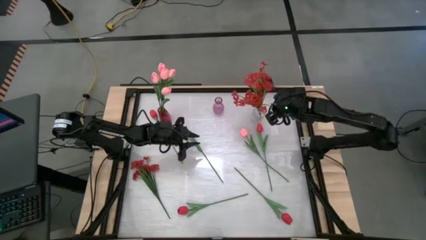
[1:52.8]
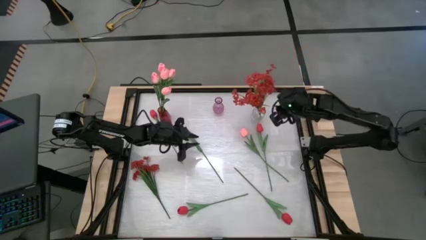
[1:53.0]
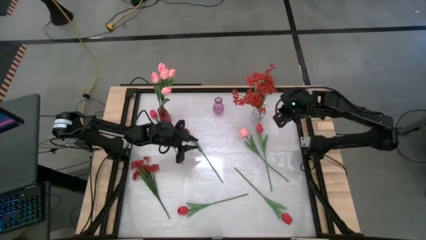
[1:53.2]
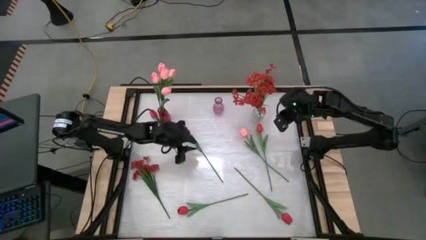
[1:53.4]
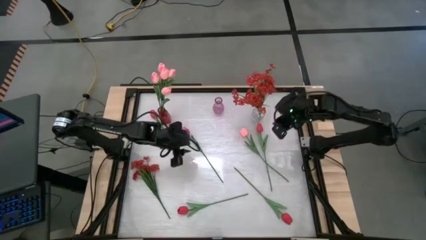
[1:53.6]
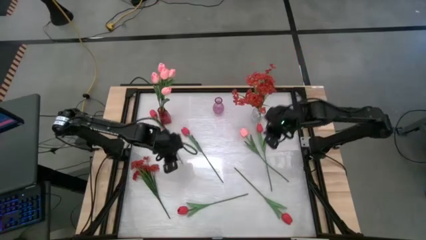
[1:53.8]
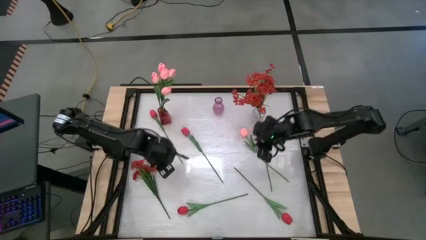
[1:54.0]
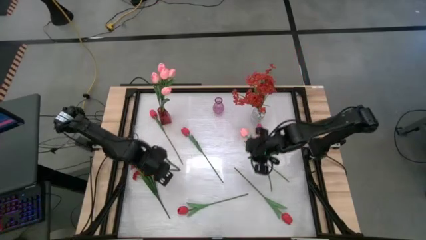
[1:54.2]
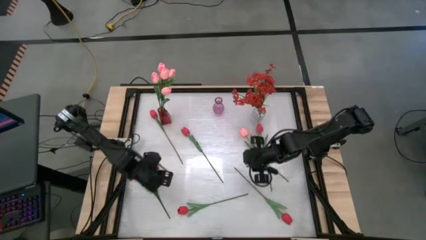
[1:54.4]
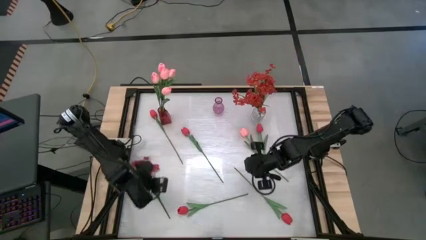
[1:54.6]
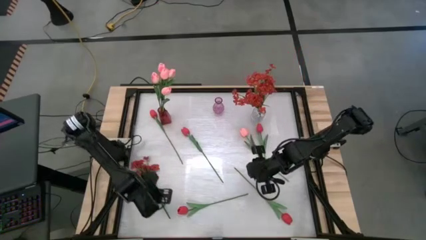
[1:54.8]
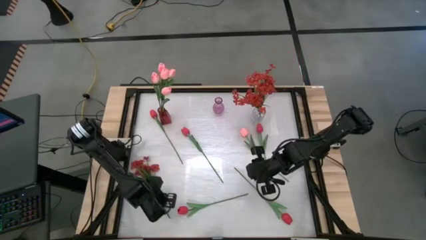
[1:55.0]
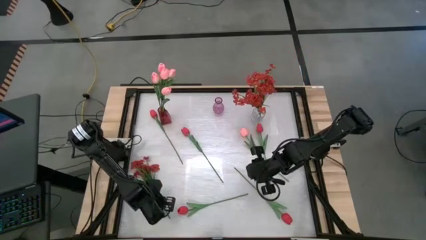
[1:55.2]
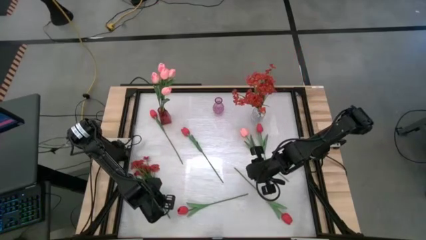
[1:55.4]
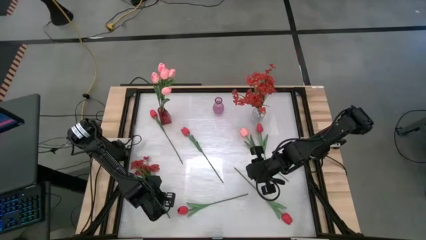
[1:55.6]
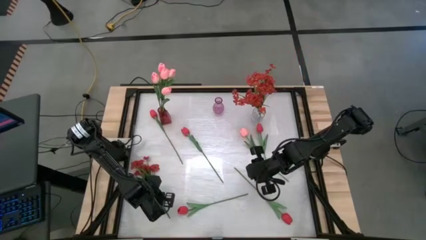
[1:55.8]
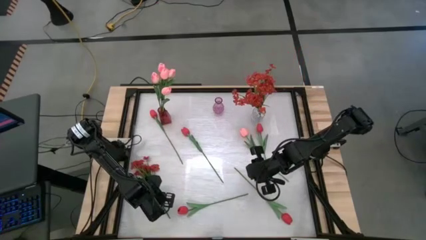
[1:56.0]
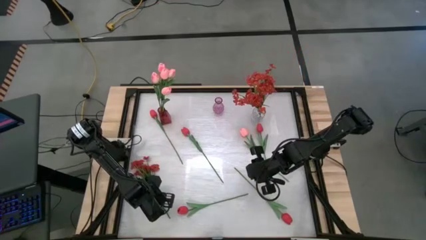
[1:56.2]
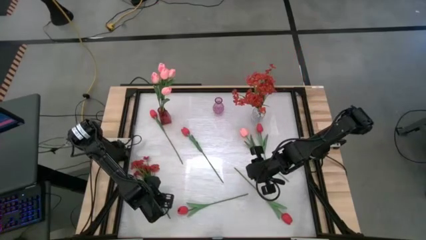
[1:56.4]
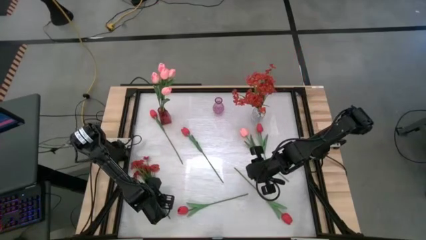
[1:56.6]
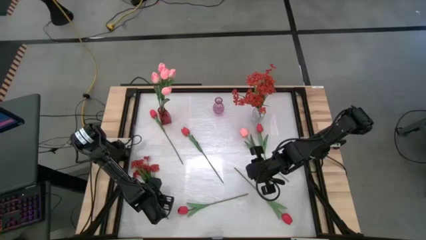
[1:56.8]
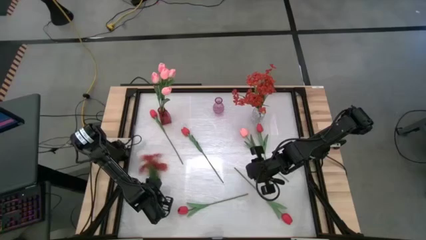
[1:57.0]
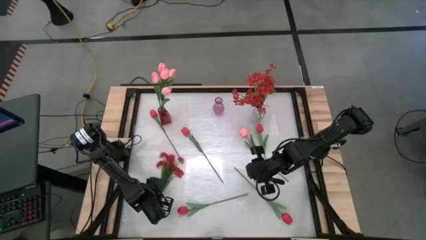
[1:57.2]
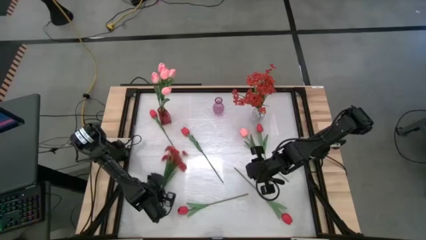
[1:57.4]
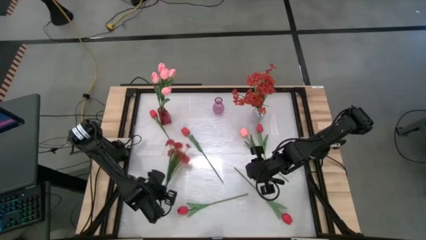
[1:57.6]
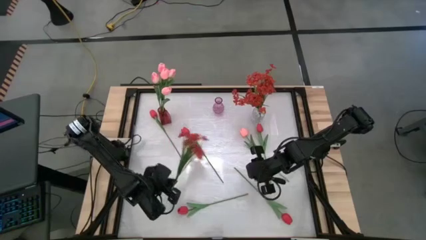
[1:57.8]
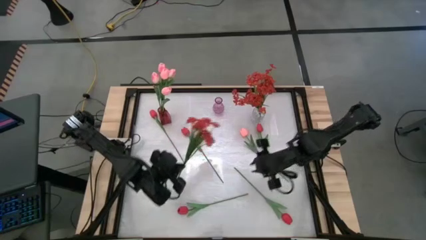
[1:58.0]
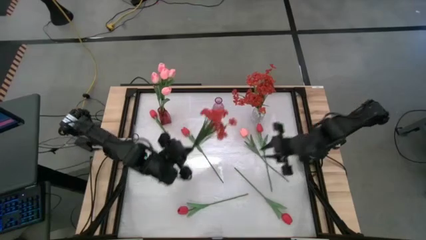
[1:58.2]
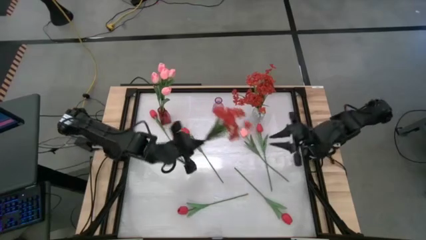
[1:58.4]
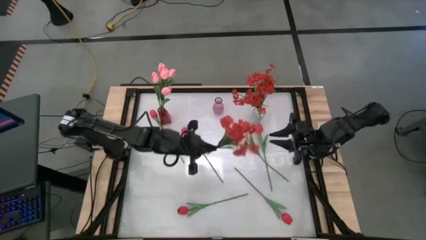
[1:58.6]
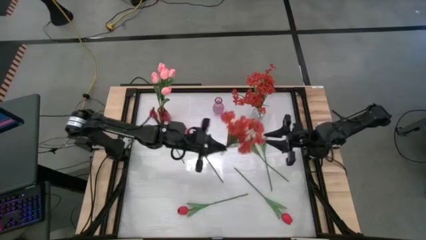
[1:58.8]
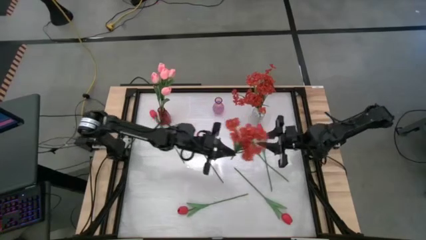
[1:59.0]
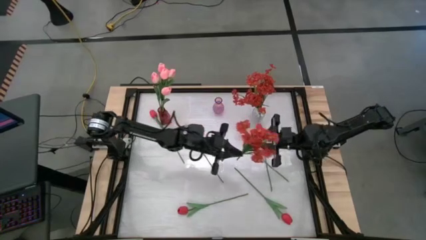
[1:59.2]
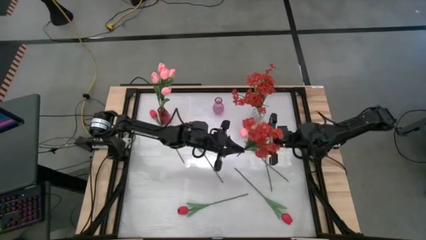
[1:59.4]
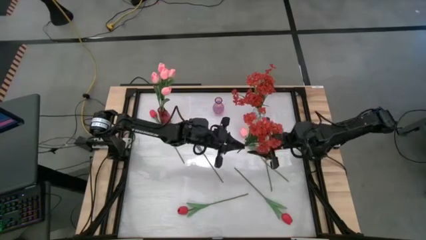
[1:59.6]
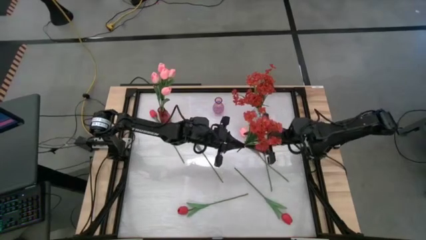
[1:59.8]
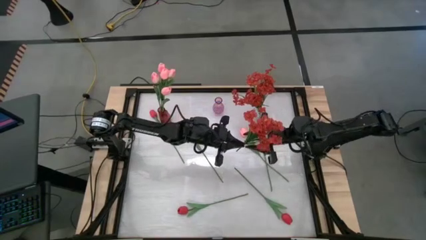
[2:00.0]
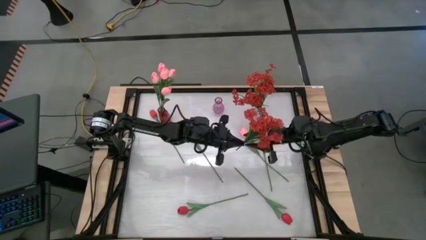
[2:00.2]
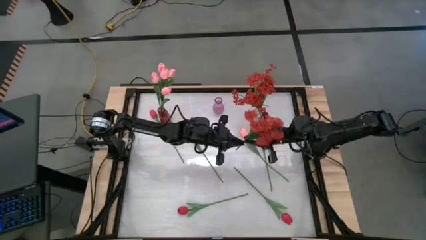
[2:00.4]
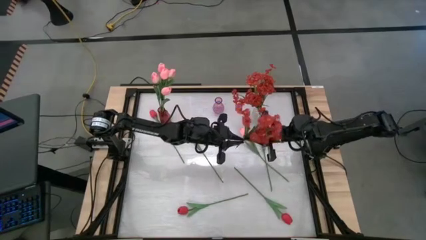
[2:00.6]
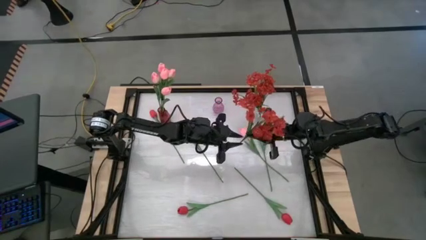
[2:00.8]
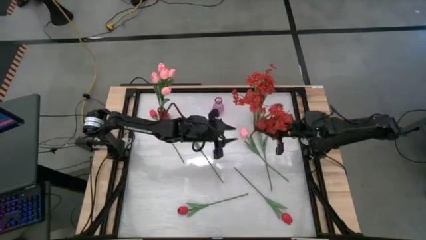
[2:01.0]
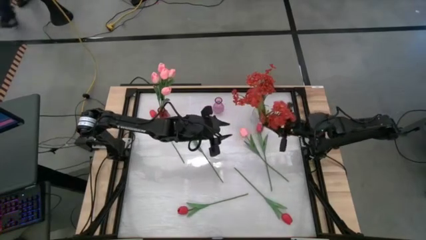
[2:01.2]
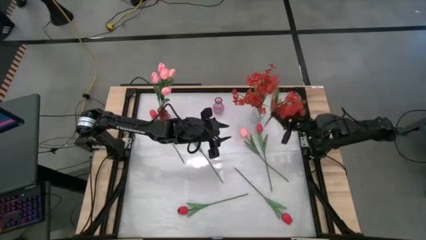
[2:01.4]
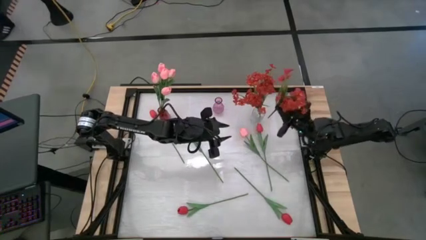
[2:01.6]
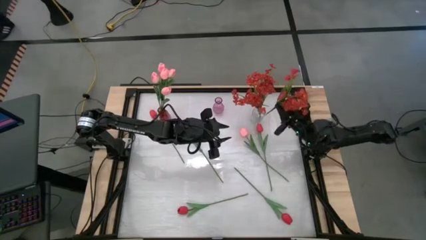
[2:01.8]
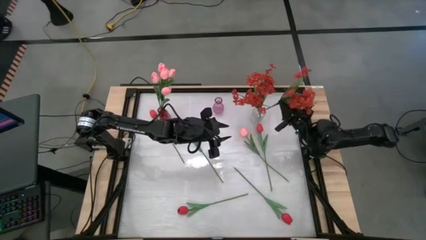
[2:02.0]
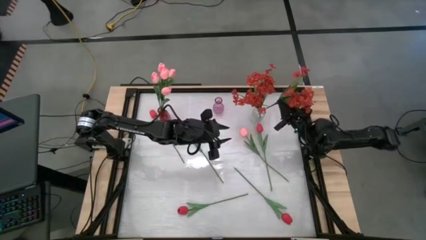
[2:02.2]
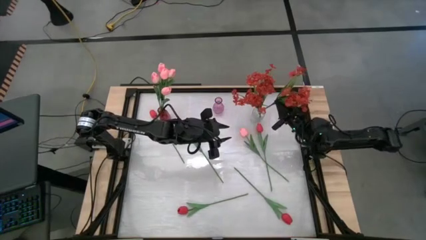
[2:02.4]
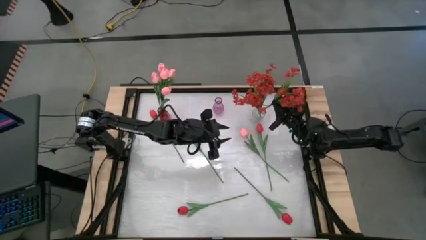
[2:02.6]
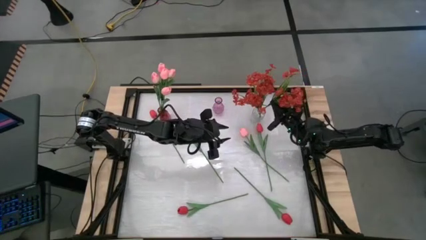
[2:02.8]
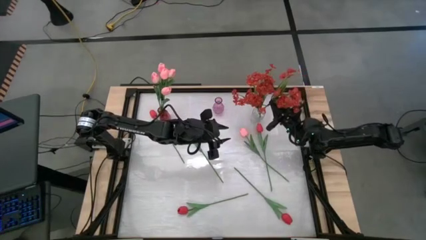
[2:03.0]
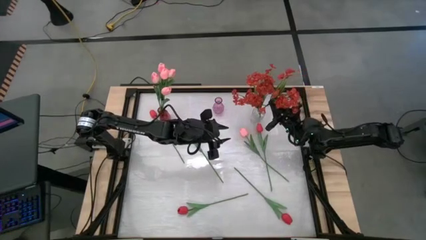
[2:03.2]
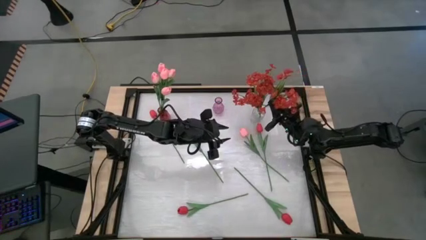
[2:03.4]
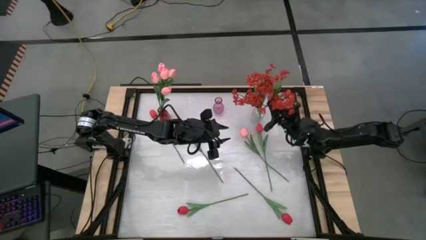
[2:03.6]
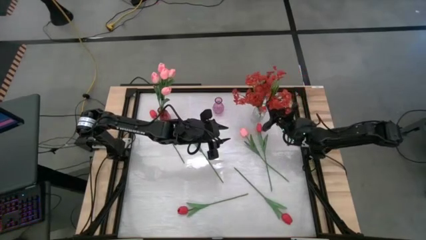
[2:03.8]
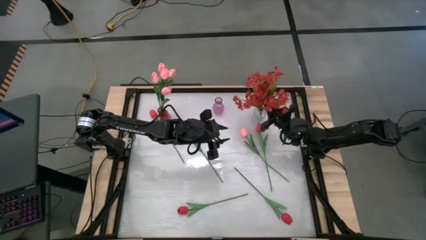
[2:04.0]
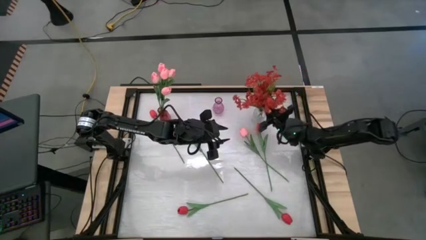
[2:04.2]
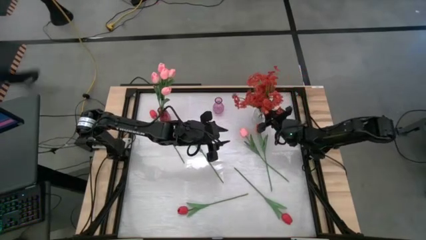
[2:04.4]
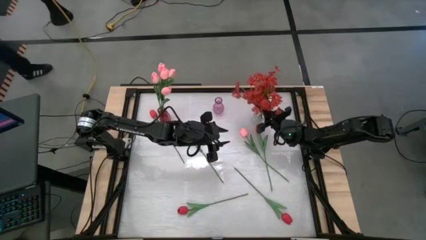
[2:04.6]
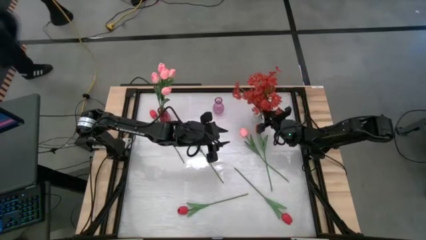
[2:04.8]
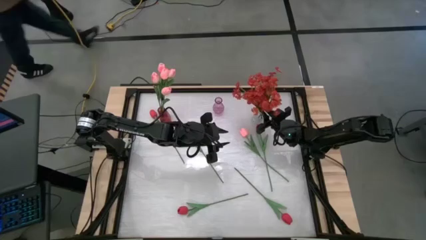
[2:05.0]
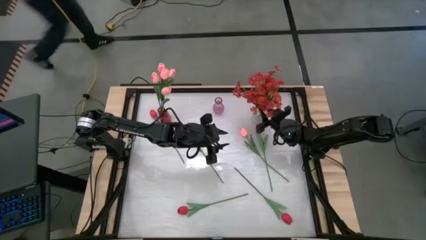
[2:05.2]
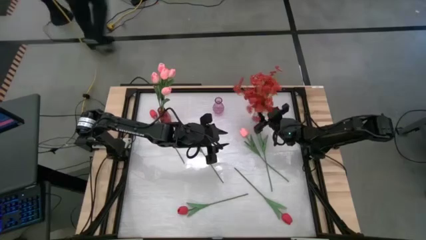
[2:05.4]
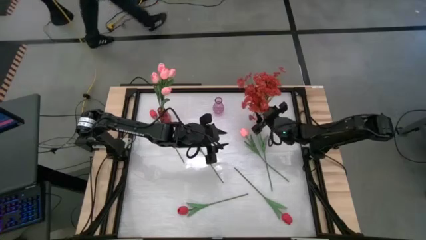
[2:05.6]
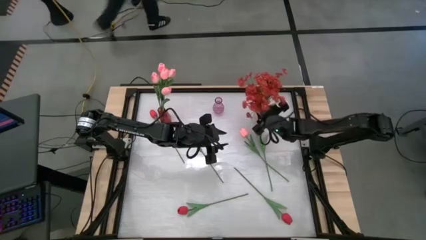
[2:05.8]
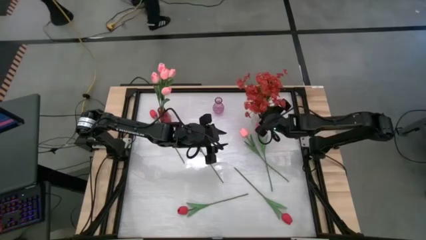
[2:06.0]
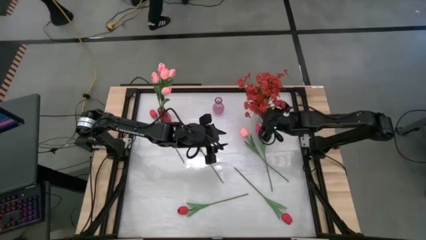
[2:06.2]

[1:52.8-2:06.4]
Task: Sort flowers into vase by color
Put the red flowers into the transparent vase

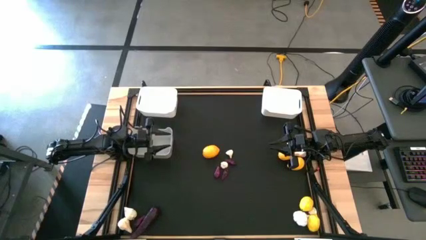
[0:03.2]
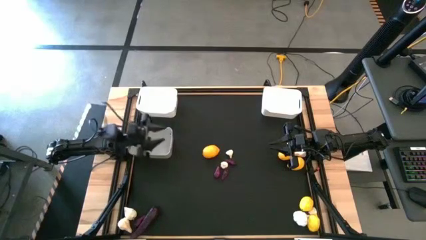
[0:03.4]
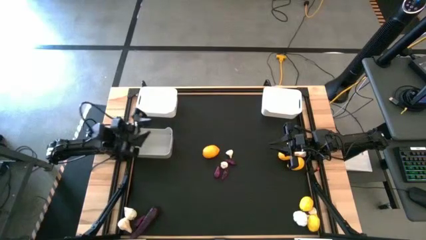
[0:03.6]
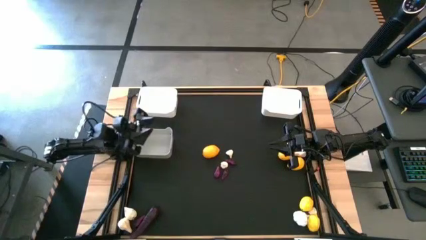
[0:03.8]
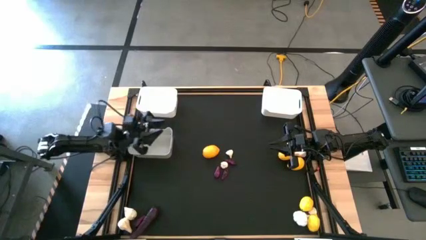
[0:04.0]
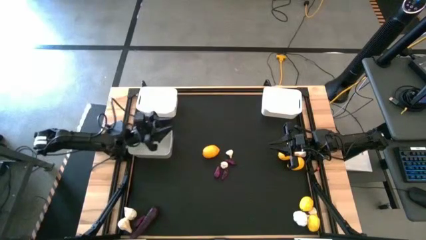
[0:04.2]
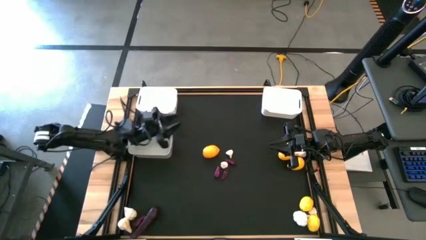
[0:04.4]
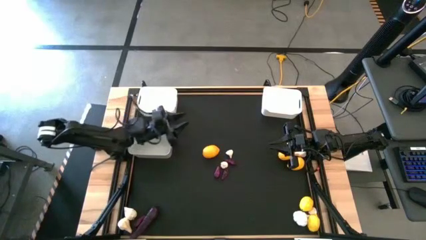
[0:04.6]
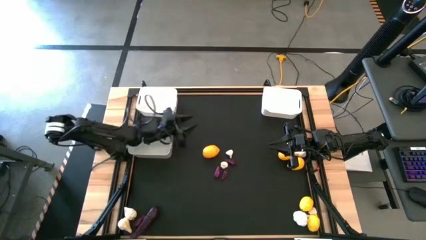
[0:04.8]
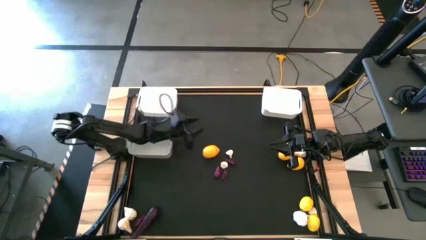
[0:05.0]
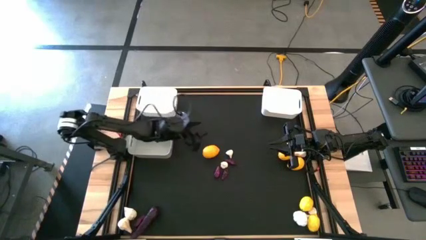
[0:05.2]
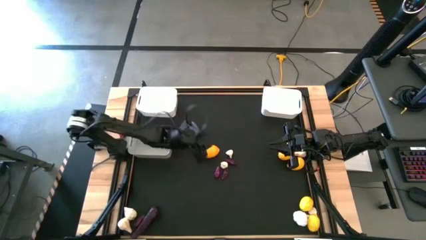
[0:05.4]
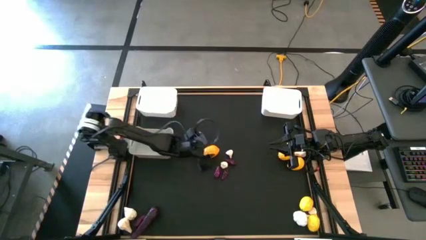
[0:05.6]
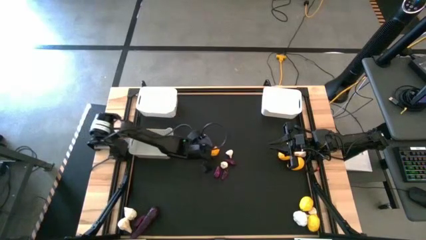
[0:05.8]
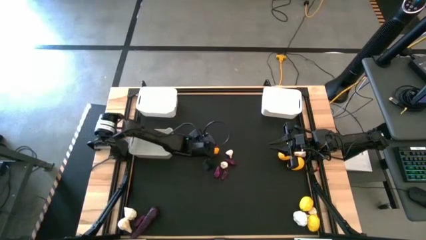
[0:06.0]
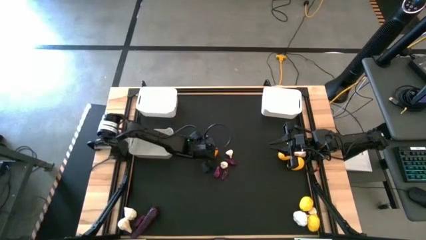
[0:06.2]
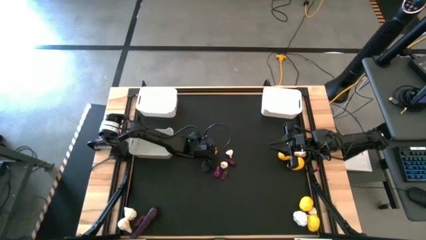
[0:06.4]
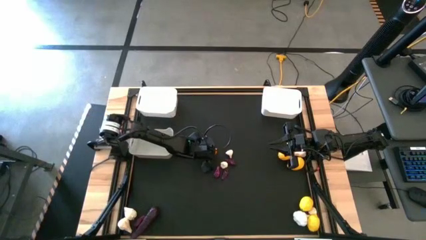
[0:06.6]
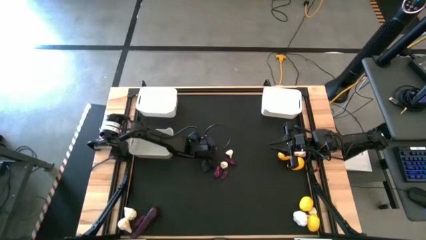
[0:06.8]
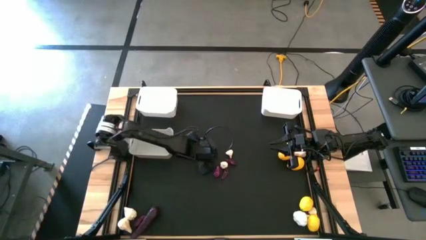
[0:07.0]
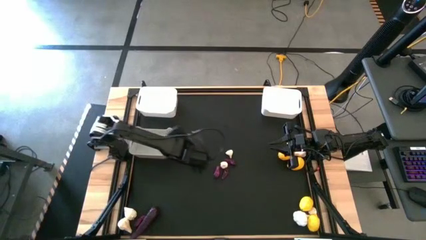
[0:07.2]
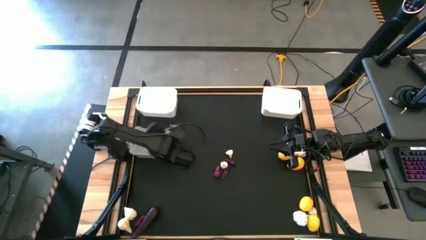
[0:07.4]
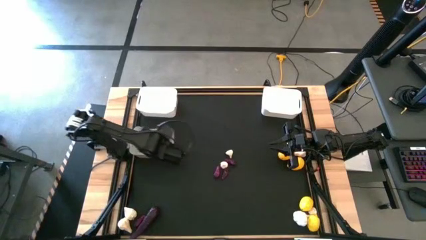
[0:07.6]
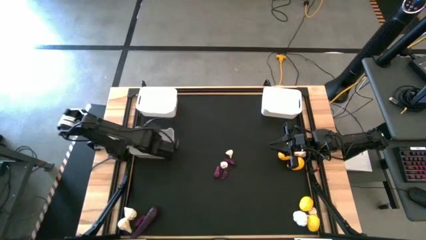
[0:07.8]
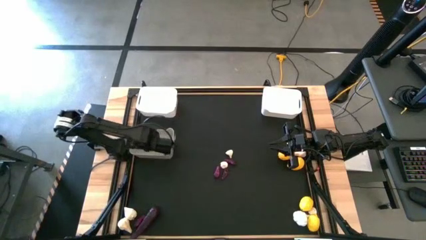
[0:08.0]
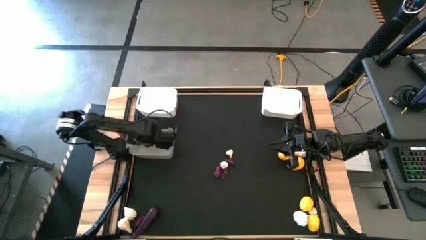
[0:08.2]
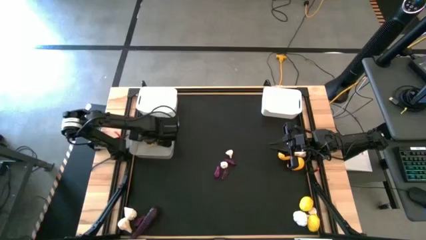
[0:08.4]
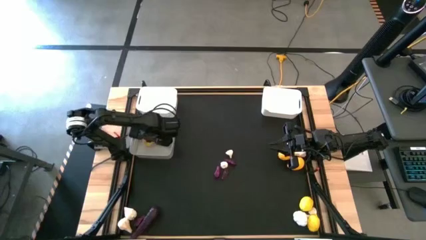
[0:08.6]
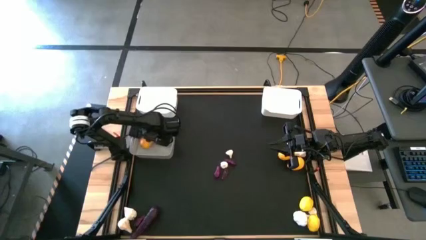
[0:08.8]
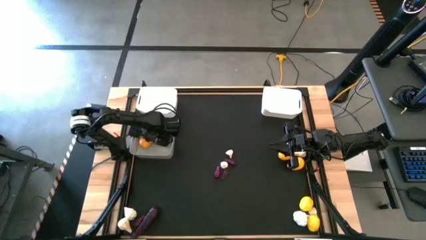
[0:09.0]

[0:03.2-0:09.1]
Task: Sort produce into baskets
Put the lemon into the gray bin
